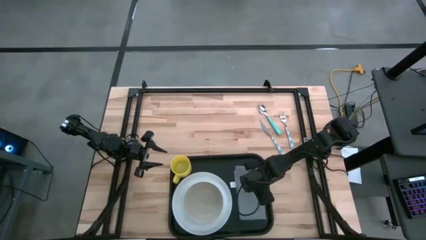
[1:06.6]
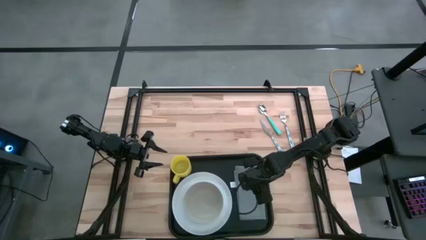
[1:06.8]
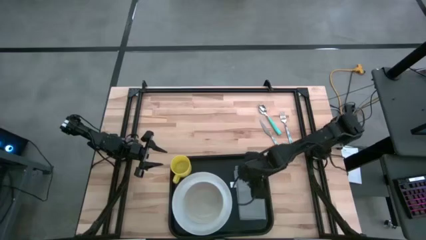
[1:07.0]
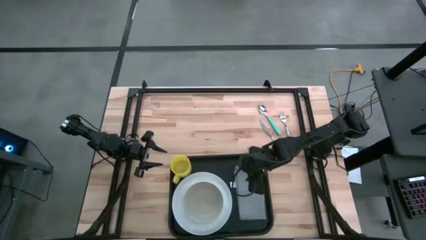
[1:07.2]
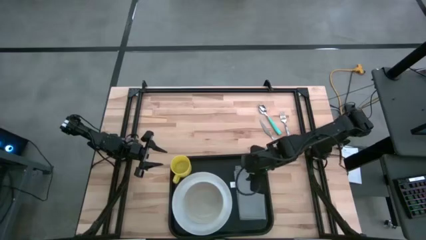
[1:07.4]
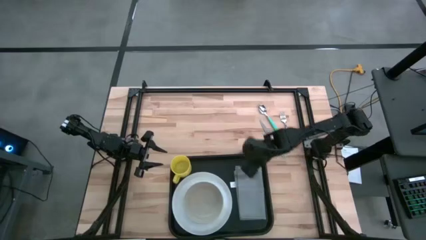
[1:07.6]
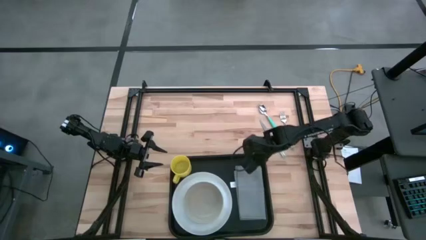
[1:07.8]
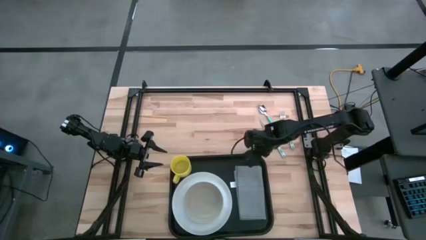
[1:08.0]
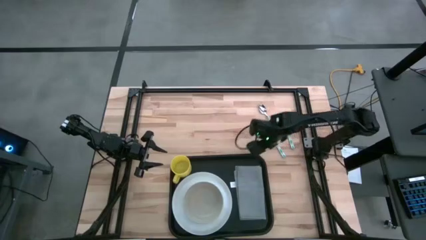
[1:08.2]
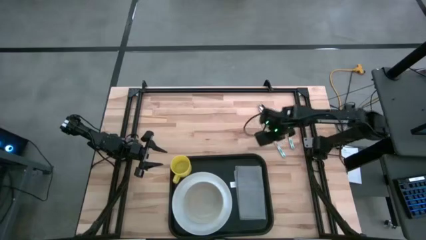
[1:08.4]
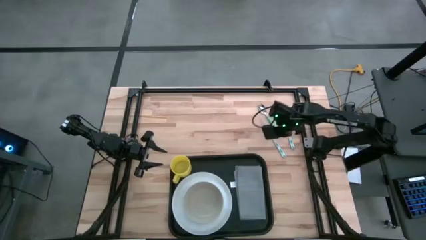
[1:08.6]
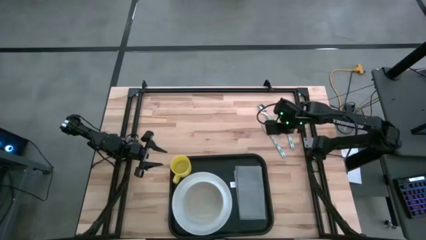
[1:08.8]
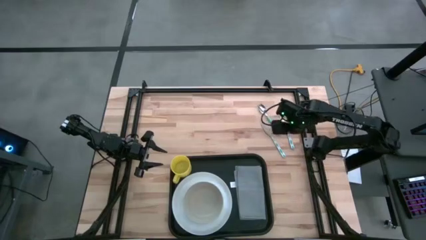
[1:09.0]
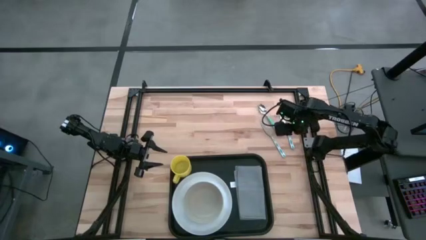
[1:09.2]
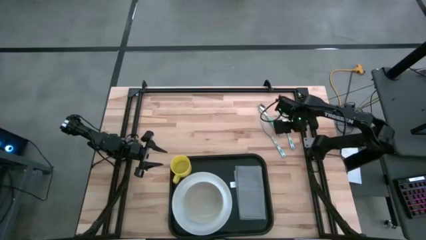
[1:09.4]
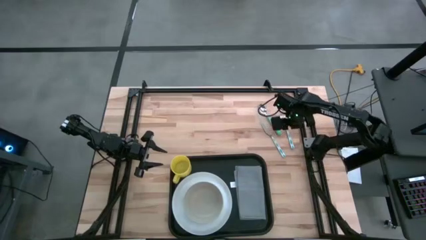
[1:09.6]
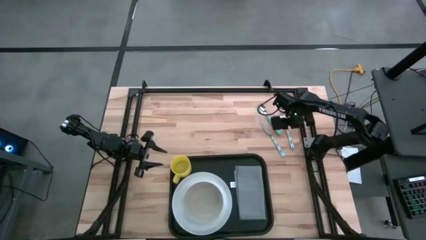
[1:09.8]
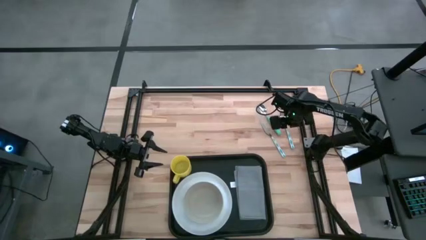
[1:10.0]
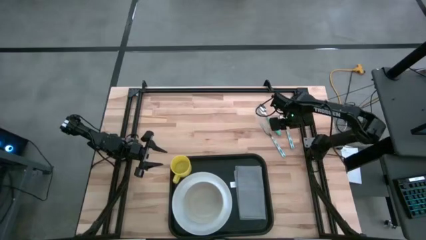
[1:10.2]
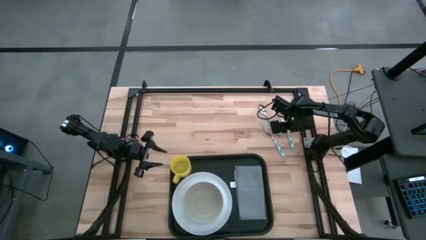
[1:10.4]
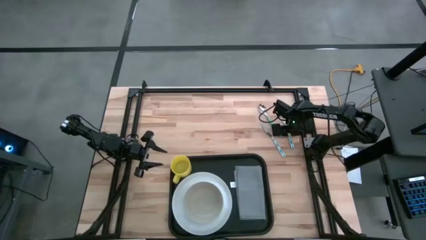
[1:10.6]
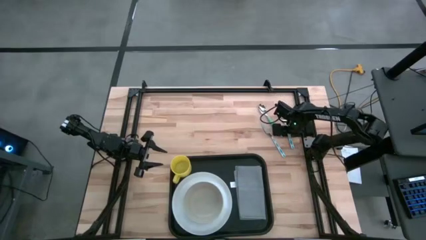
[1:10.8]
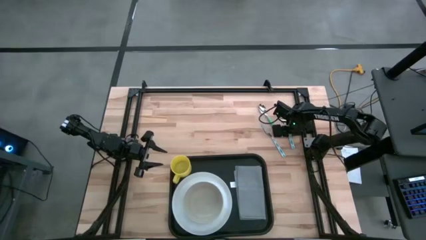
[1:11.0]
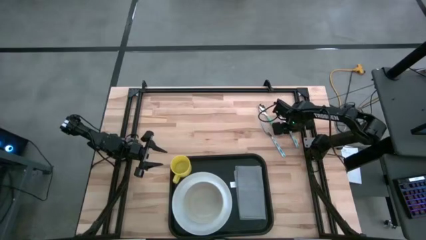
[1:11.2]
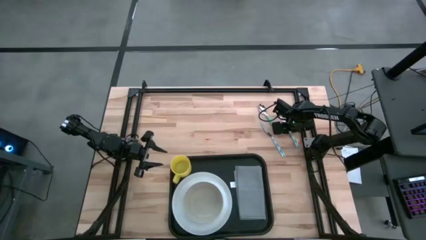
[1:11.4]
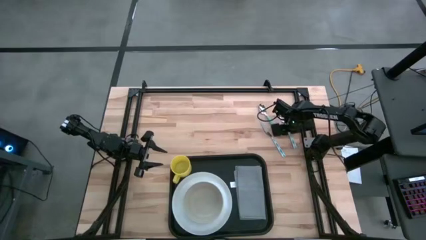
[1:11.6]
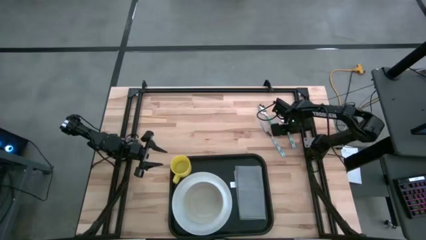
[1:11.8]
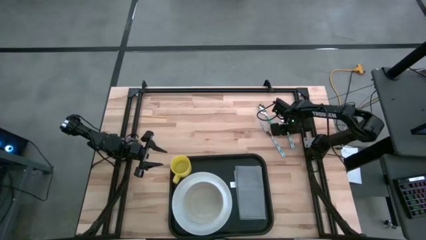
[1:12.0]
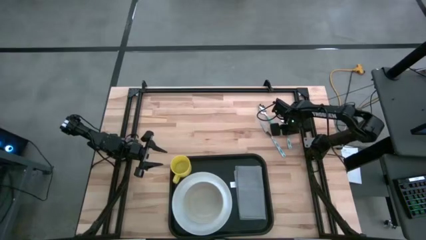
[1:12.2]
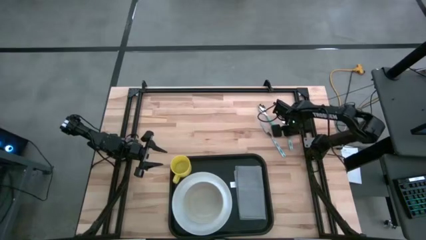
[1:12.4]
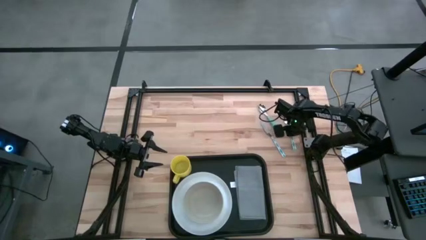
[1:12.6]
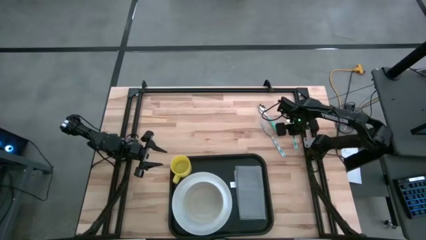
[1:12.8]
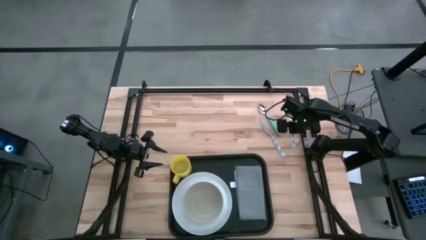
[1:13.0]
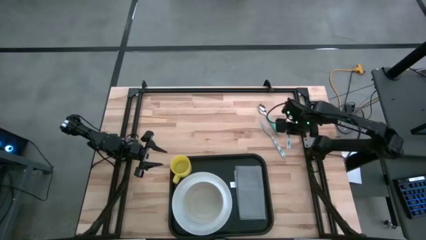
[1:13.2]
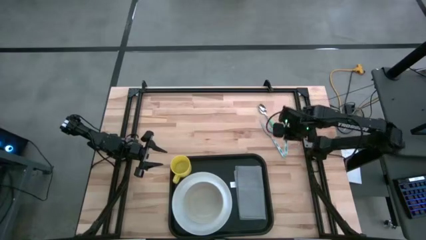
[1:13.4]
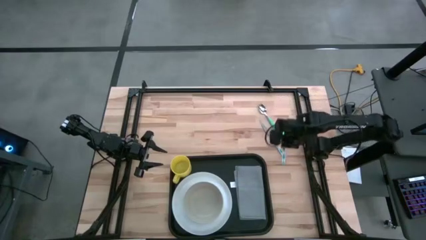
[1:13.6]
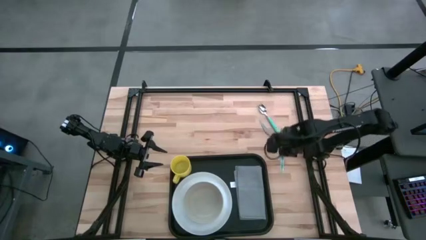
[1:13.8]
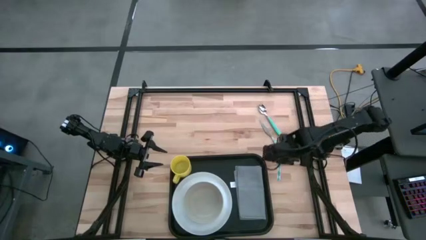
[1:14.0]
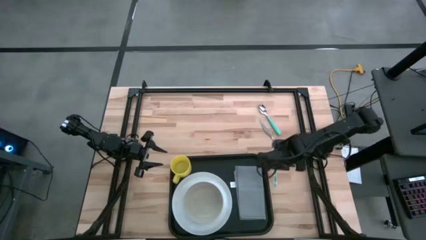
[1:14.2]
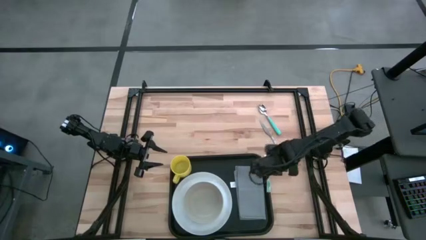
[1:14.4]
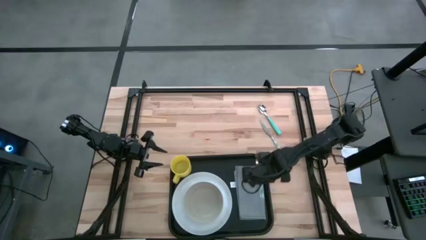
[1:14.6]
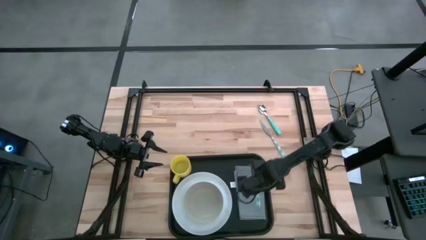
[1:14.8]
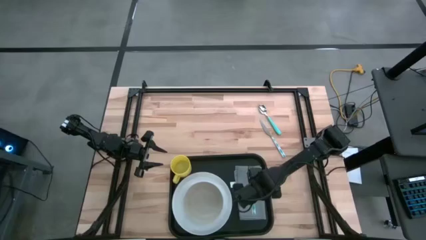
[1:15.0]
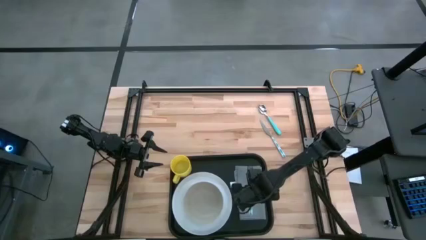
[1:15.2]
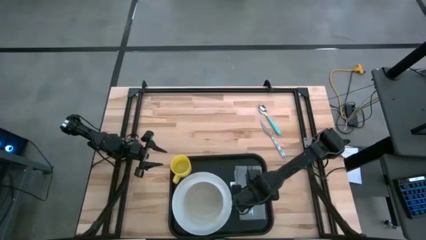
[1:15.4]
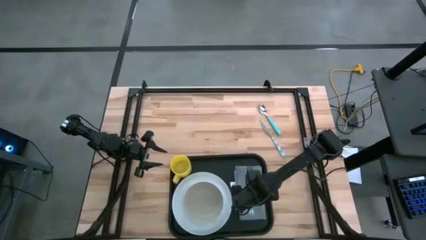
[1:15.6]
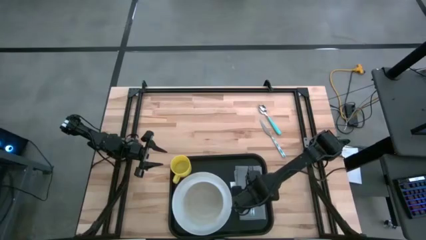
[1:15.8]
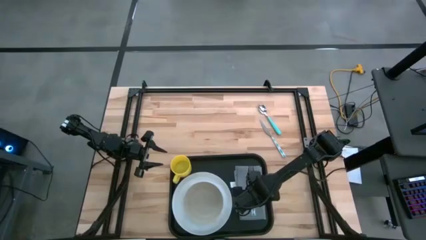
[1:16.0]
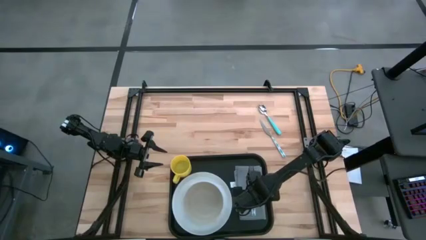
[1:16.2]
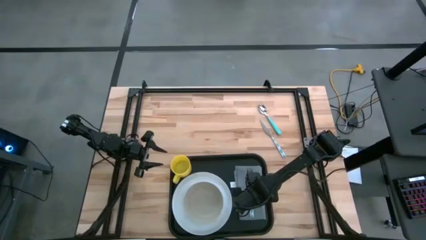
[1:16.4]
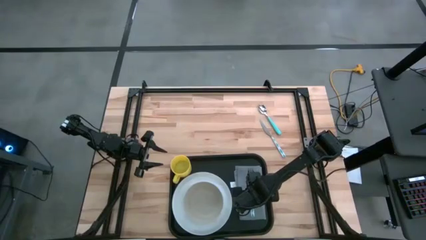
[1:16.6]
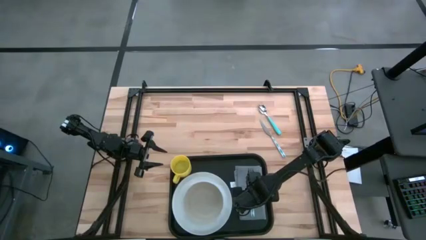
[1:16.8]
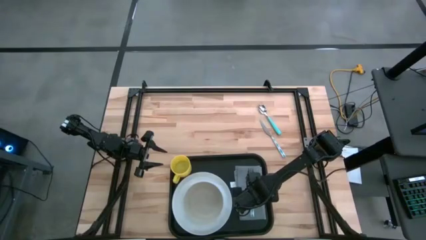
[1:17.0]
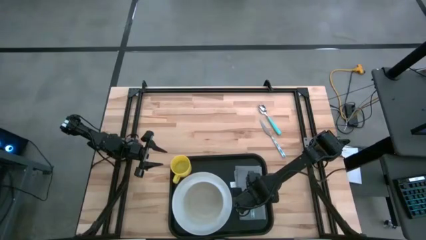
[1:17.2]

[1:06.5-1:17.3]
Task: Set up tray
Put the white fork to the right of the white plate on the gray napkin on the black serving tray

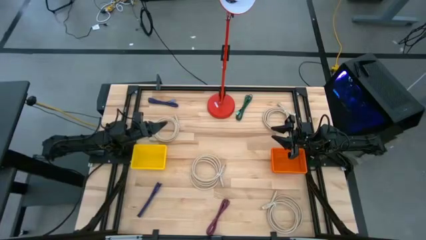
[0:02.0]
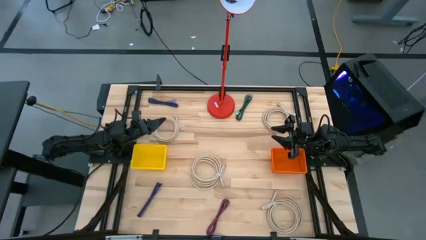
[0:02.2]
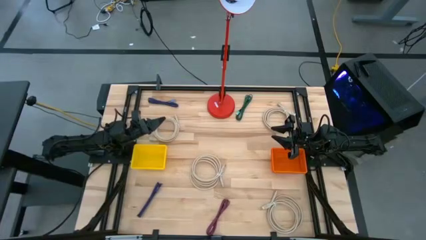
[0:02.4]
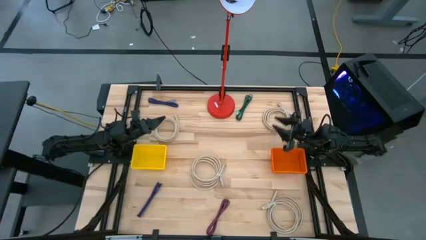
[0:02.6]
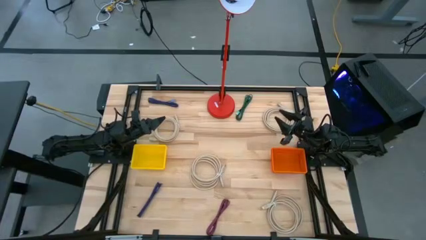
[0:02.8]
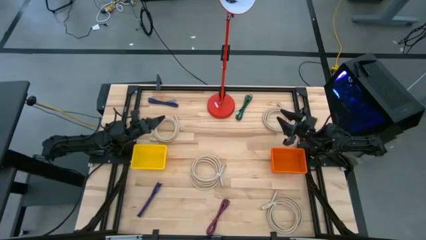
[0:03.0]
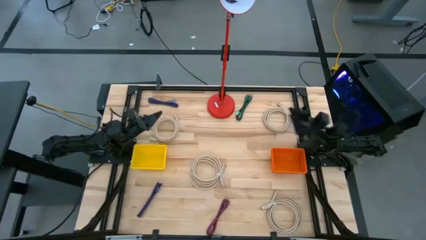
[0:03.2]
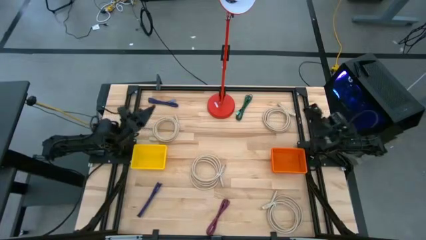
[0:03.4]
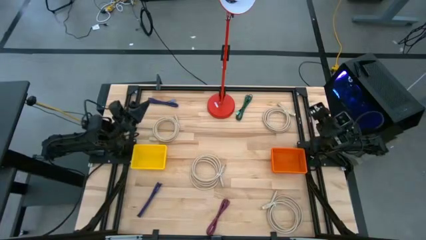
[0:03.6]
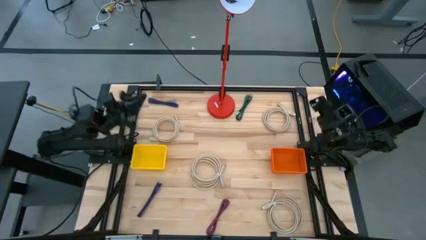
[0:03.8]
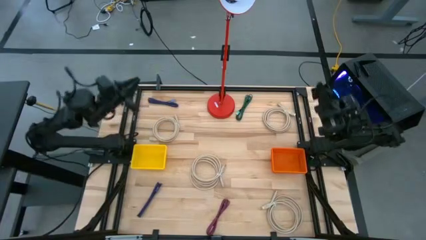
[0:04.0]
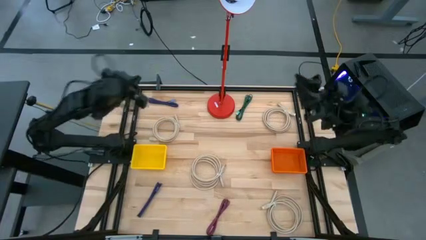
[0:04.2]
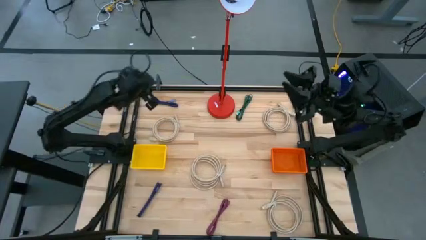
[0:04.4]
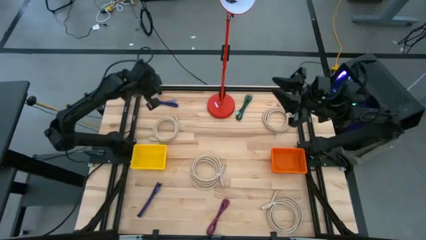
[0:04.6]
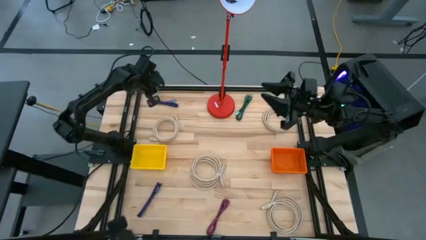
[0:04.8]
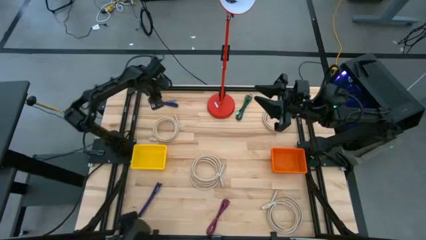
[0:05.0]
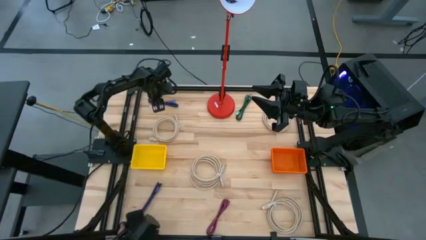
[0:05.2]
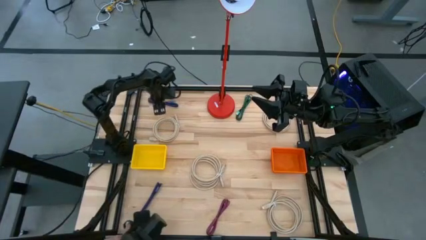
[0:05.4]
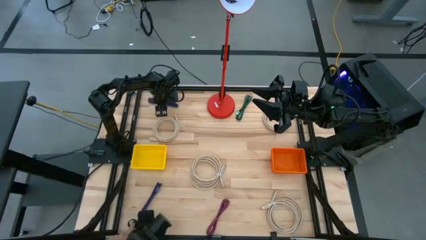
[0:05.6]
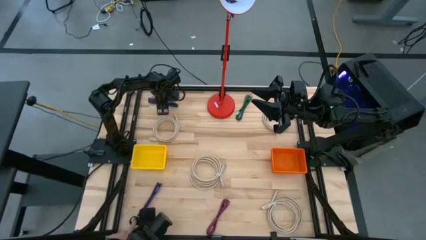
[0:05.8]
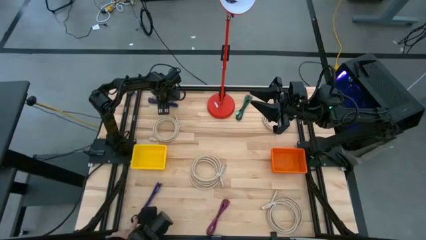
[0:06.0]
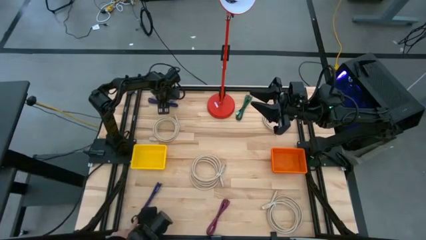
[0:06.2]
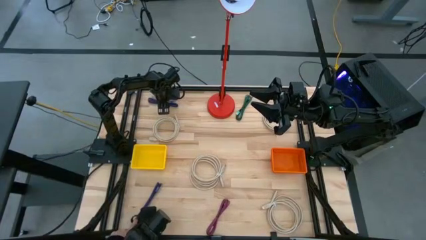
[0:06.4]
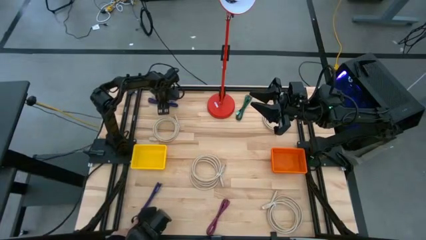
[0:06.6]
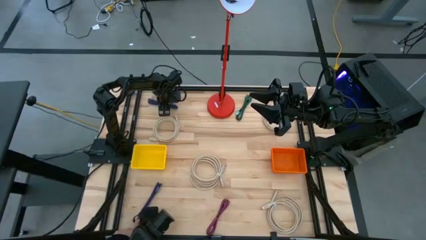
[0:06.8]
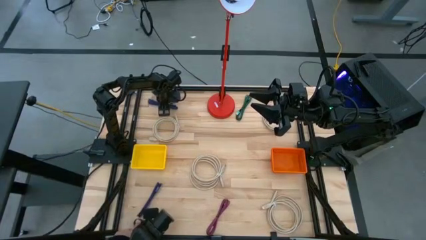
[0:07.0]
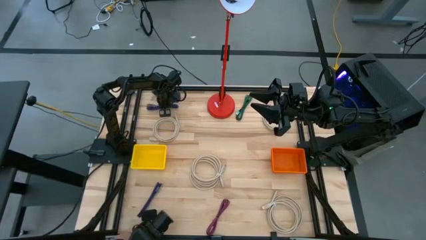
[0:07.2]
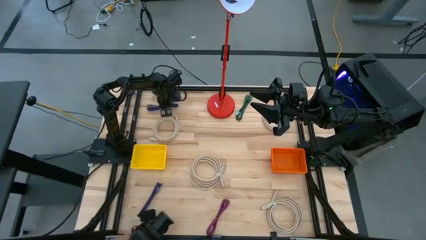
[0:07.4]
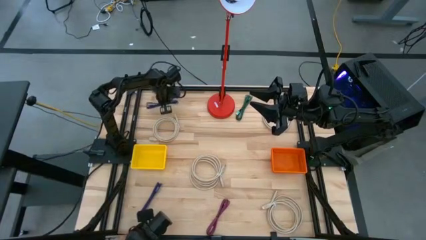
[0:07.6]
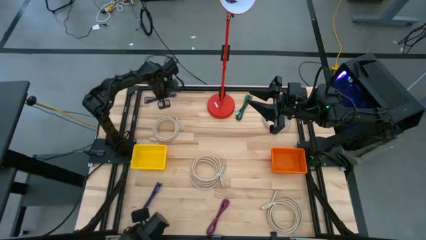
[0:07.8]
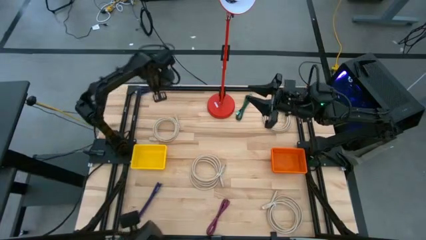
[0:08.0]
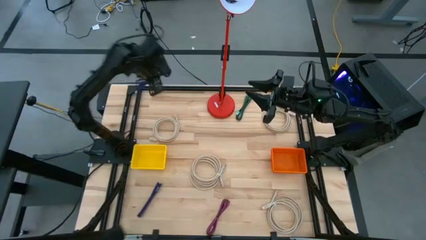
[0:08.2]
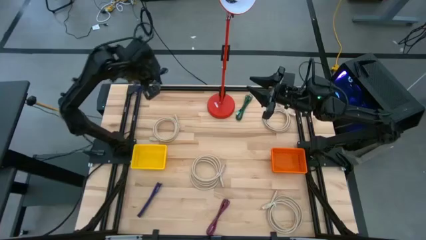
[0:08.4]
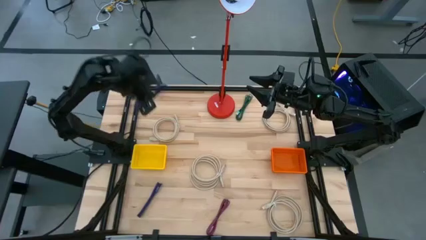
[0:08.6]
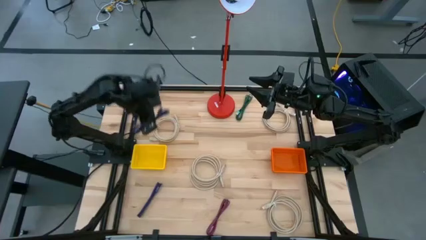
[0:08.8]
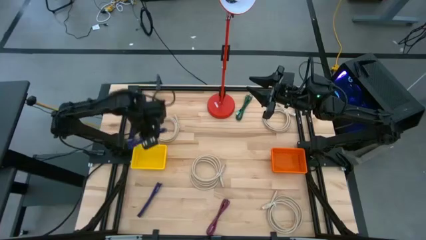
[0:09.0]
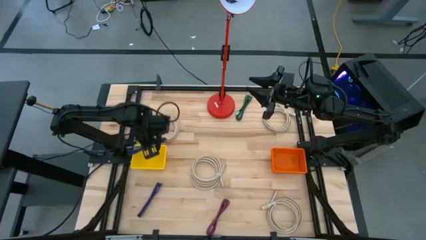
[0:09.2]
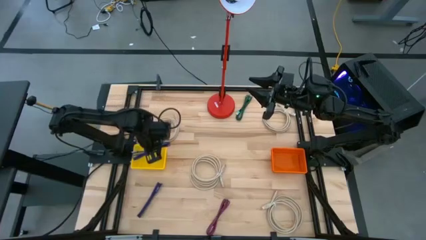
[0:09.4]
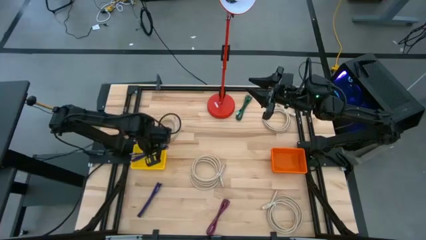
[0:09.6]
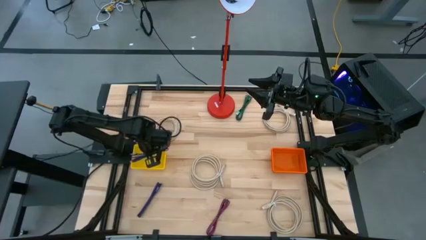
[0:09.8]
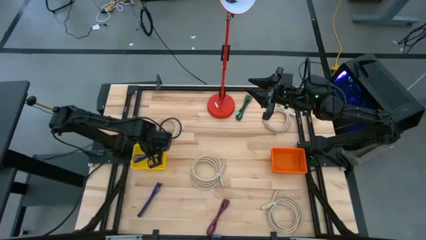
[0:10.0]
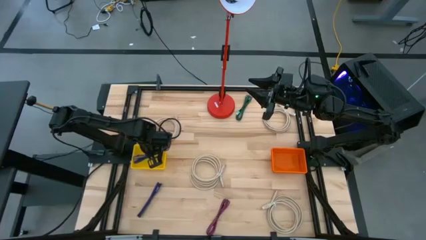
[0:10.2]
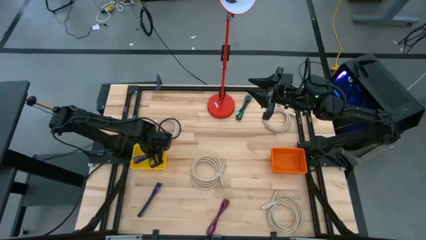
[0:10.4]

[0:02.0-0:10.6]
Task: Pick & Place USB Port
Put the black and blue charger cable into the yellow bin
